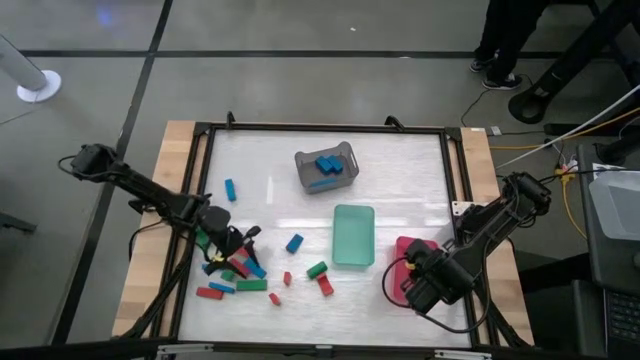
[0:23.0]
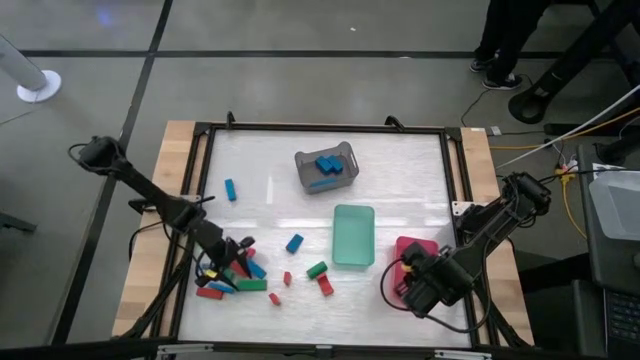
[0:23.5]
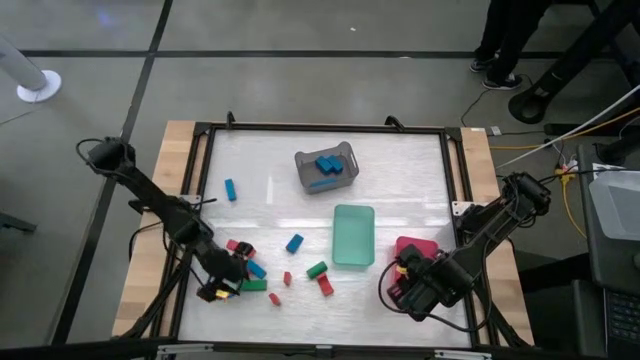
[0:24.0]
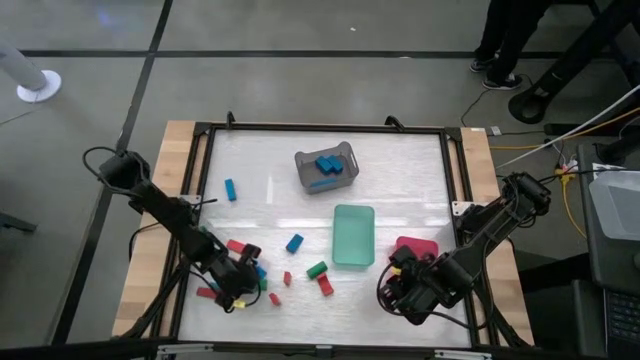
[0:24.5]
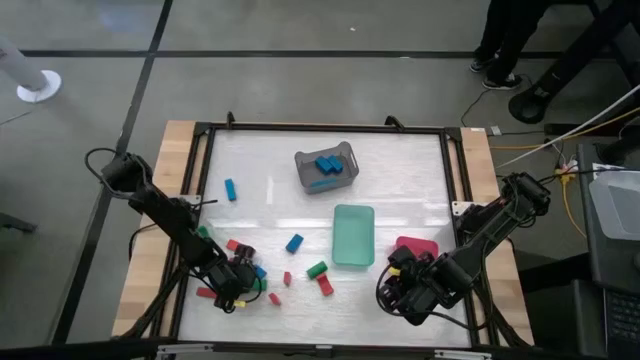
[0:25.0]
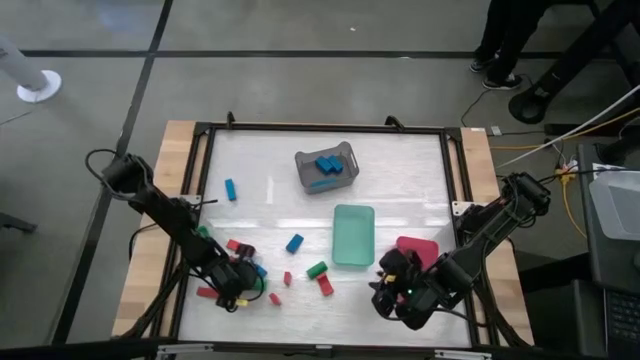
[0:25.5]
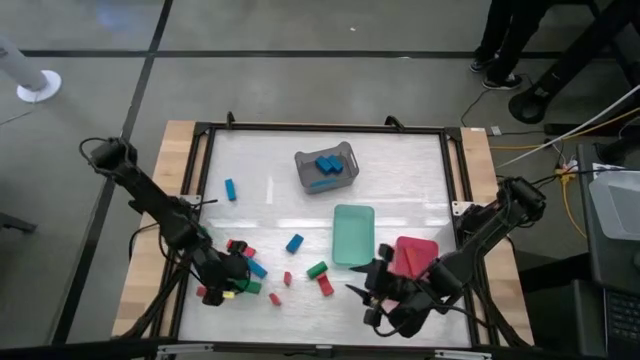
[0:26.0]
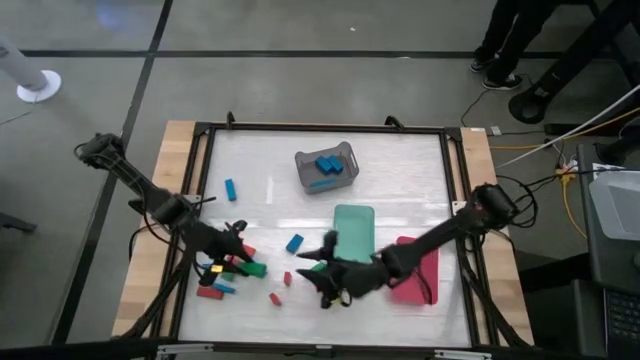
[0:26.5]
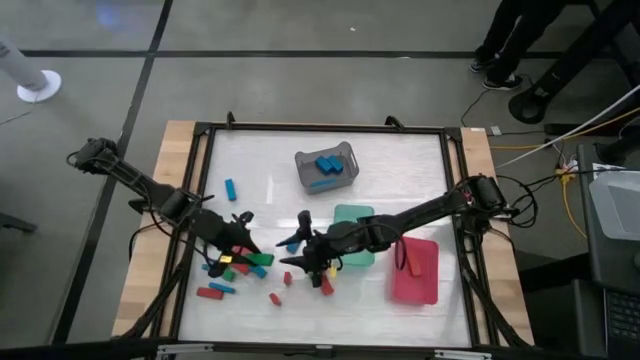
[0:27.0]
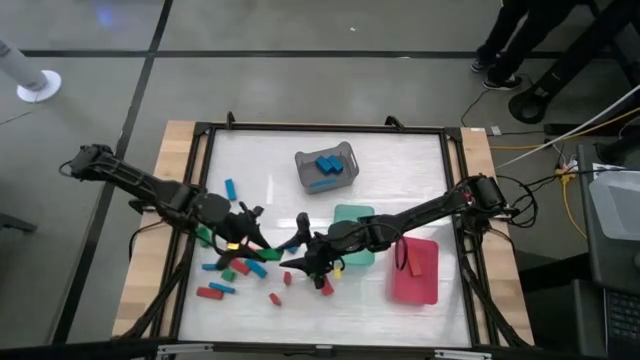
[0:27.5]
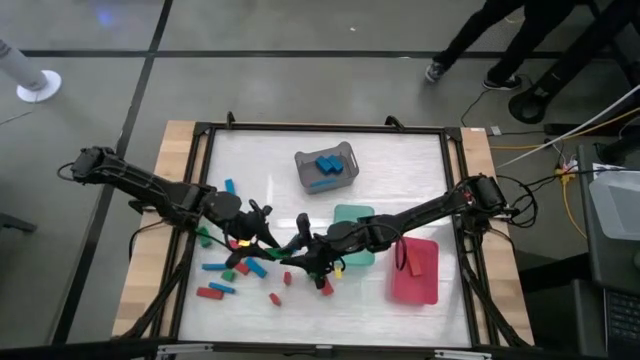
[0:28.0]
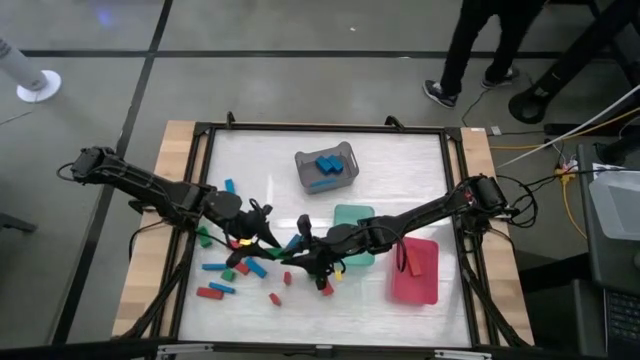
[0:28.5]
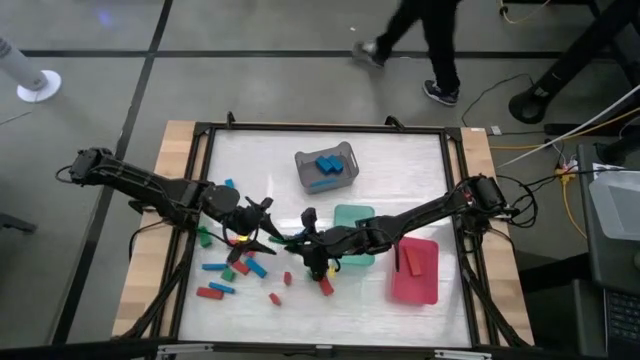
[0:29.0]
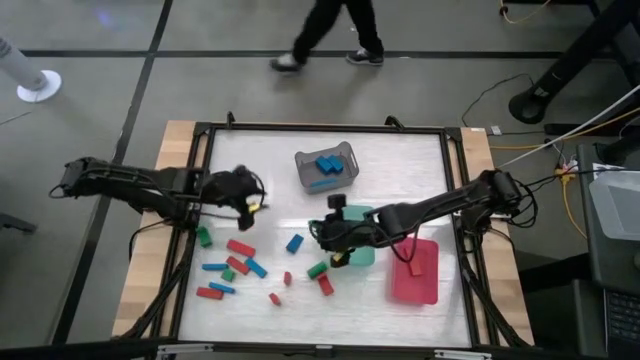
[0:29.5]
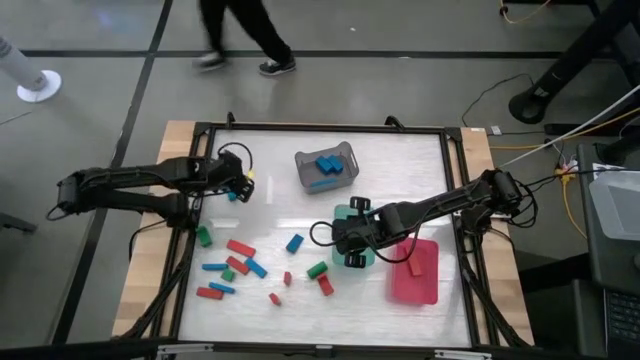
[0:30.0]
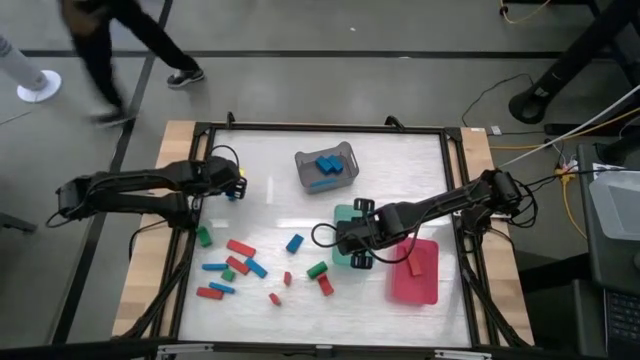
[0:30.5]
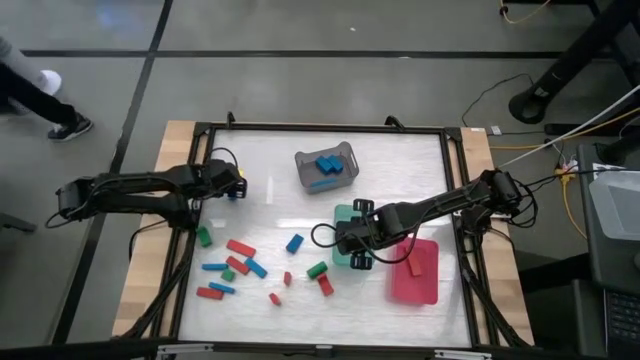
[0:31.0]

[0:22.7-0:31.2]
Task: Sort blocks
Put the green block into the green bin

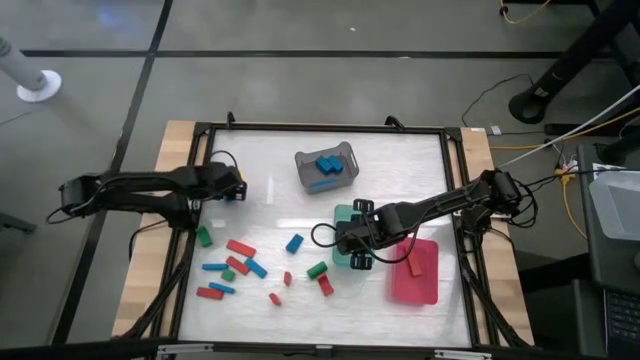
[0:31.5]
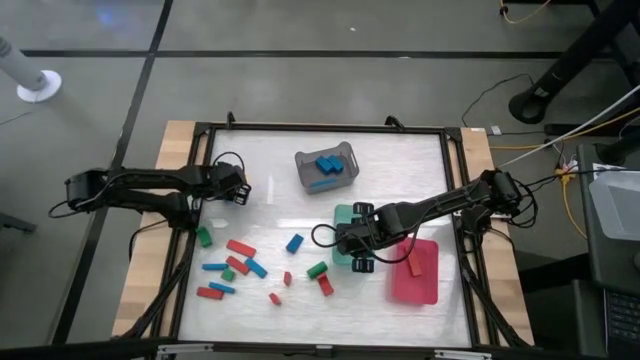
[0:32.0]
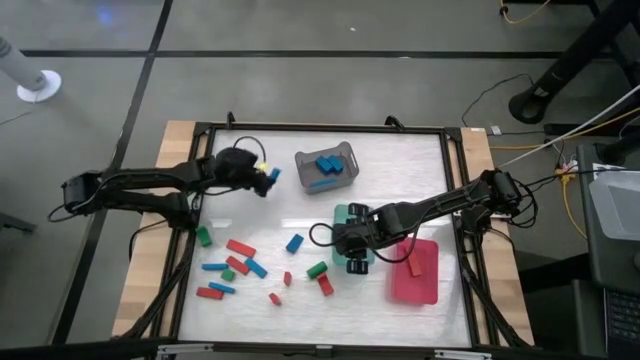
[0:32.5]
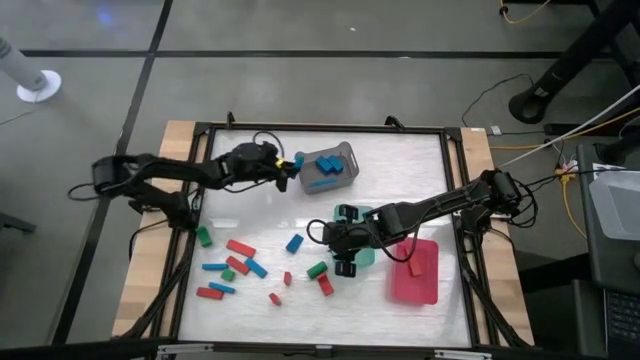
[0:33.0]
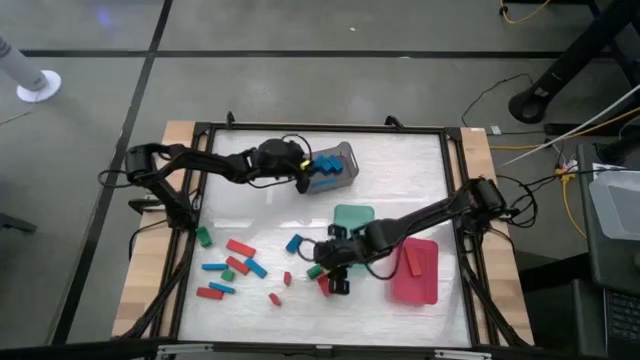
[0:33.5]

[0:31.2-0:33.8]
Put the blue block into the gray bin

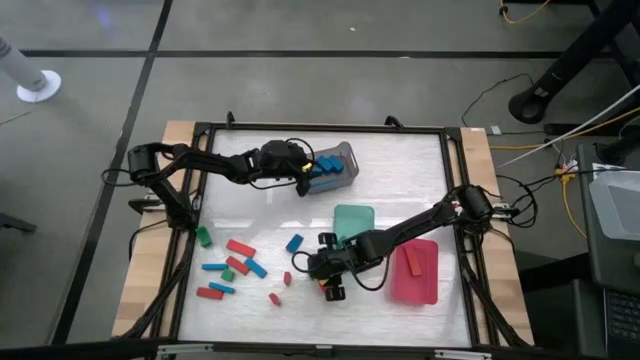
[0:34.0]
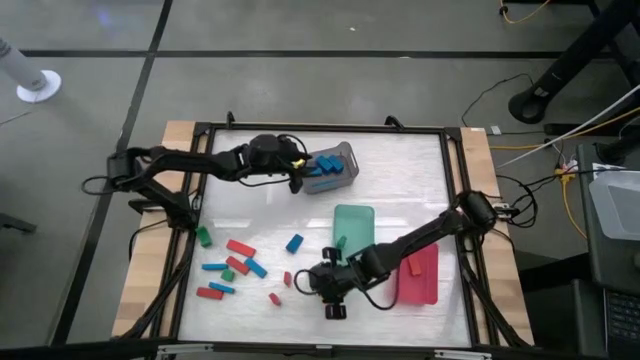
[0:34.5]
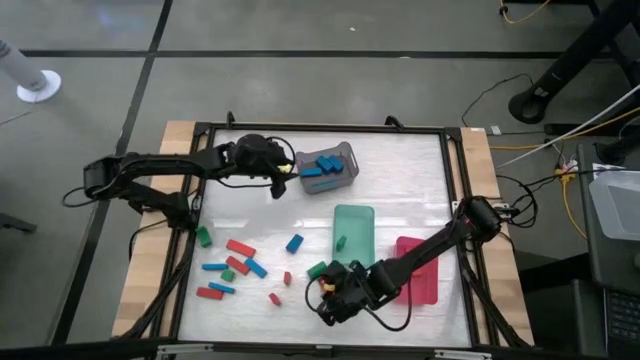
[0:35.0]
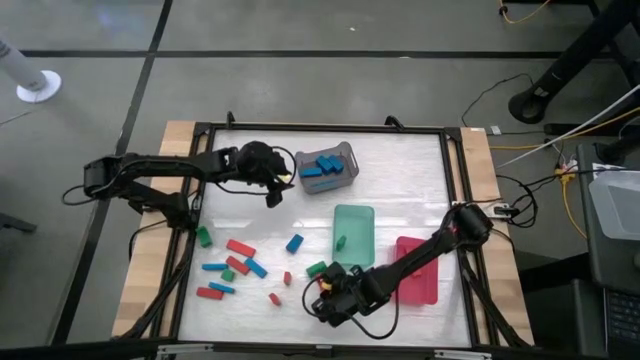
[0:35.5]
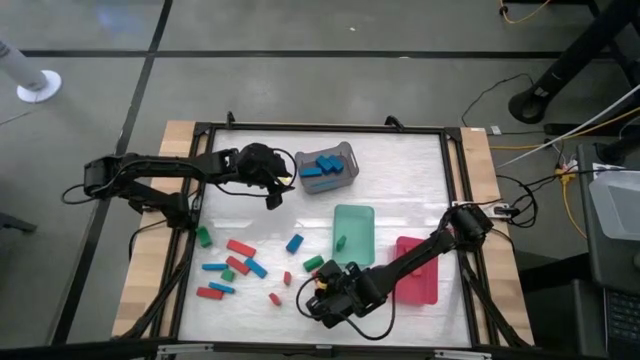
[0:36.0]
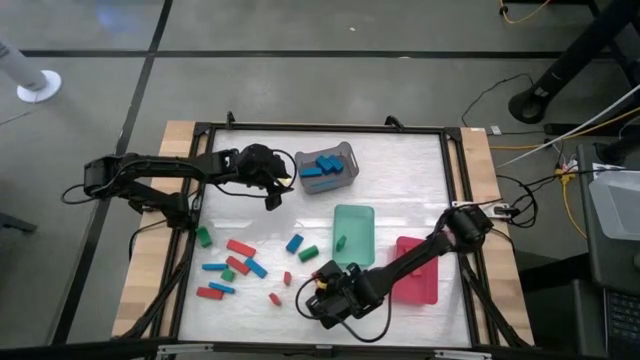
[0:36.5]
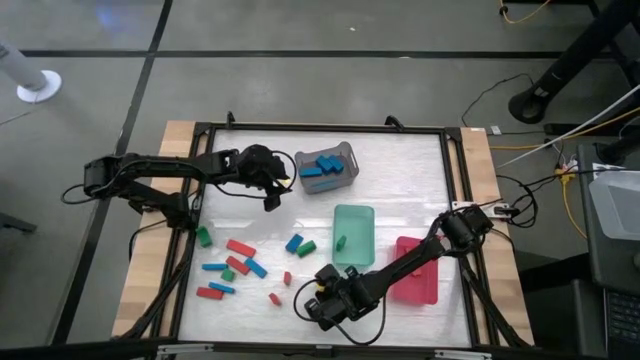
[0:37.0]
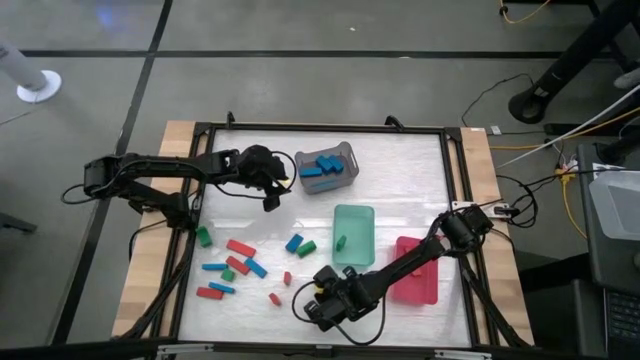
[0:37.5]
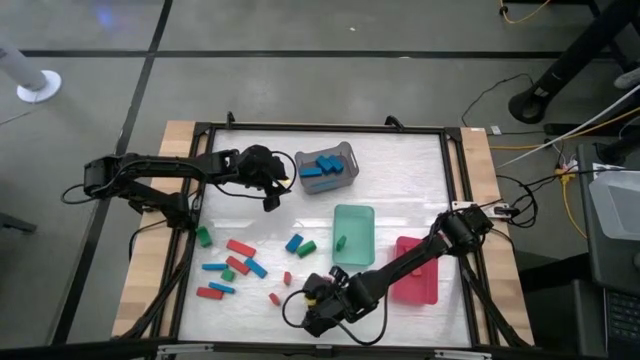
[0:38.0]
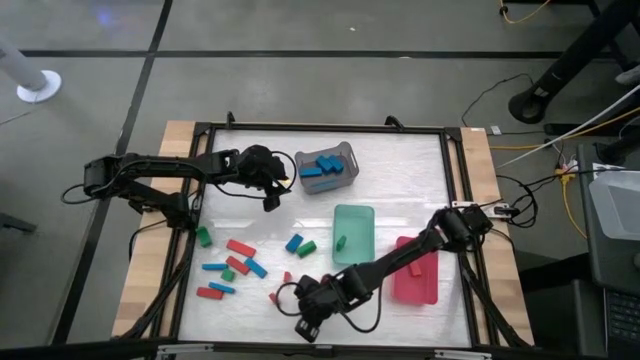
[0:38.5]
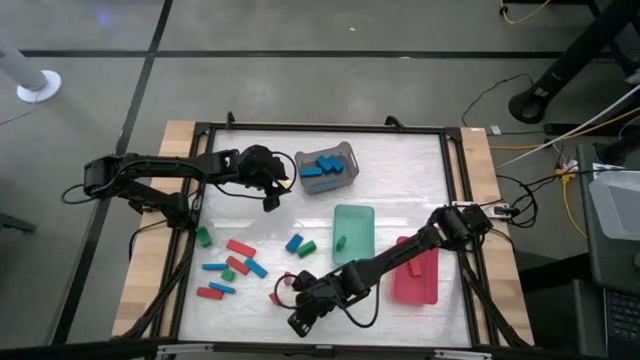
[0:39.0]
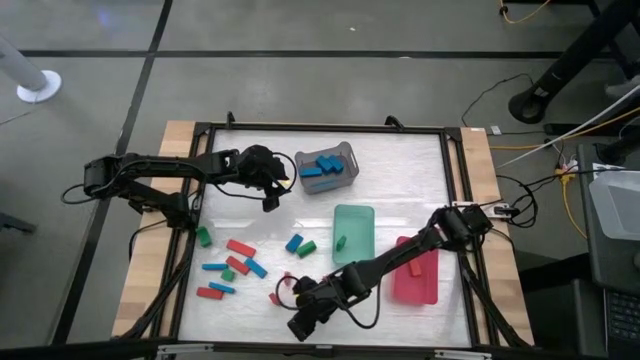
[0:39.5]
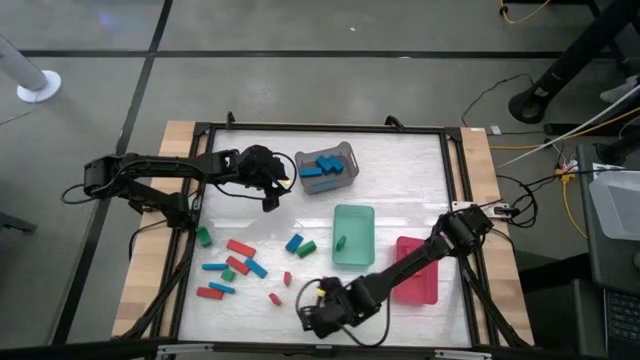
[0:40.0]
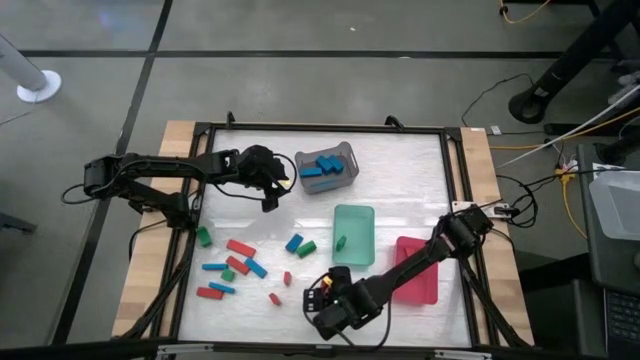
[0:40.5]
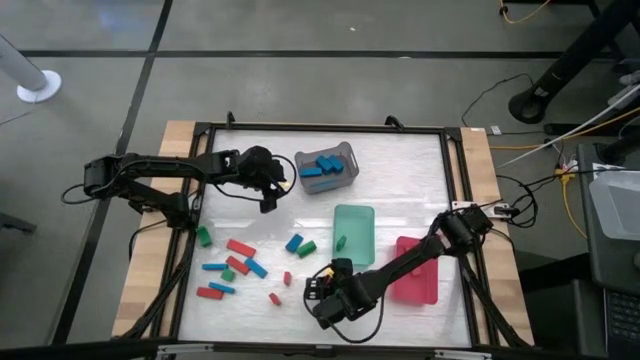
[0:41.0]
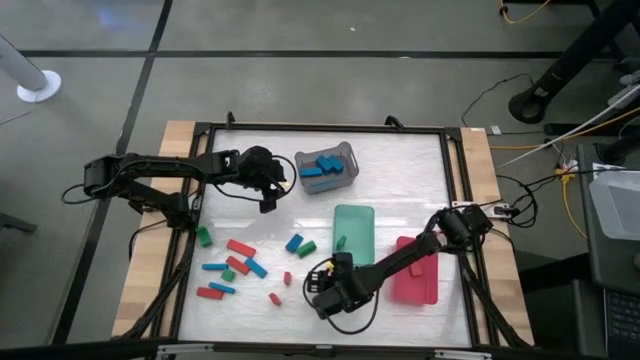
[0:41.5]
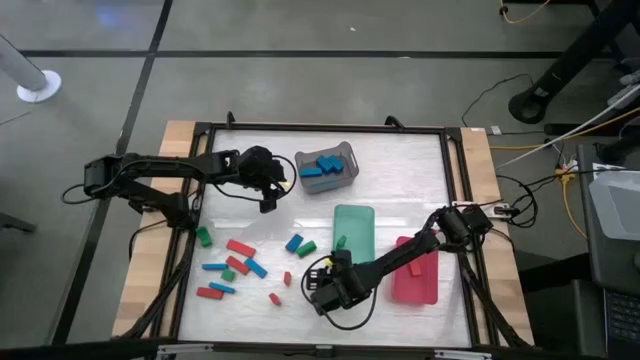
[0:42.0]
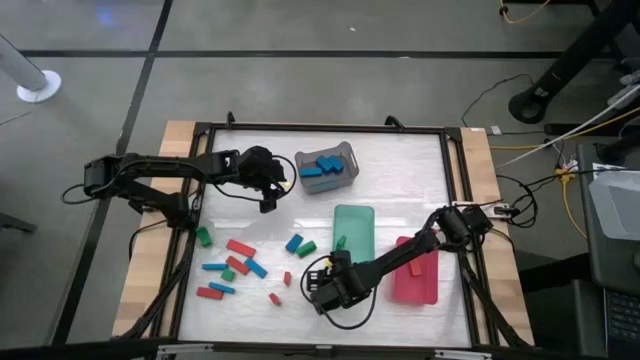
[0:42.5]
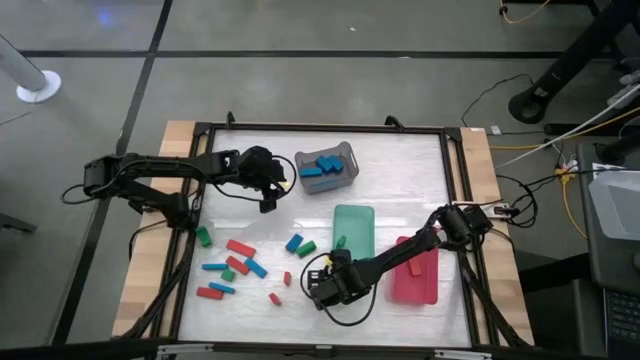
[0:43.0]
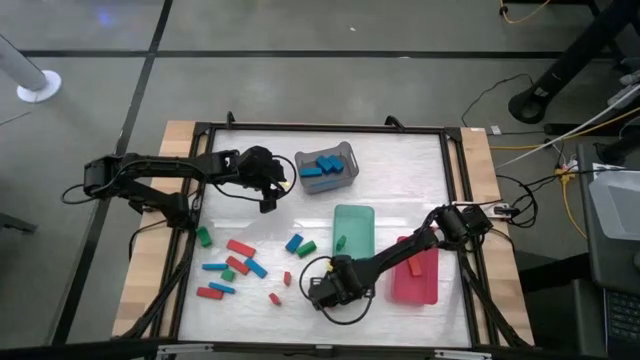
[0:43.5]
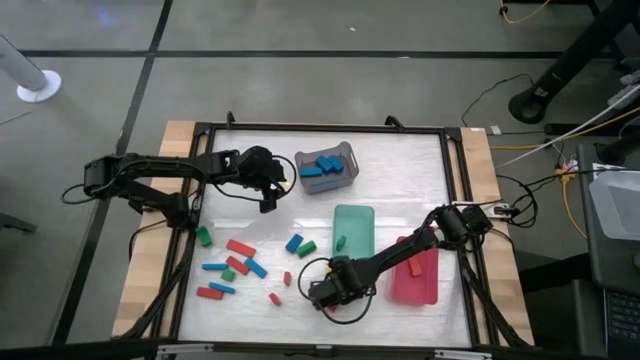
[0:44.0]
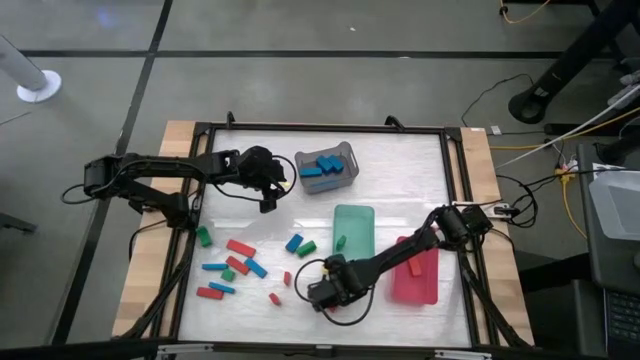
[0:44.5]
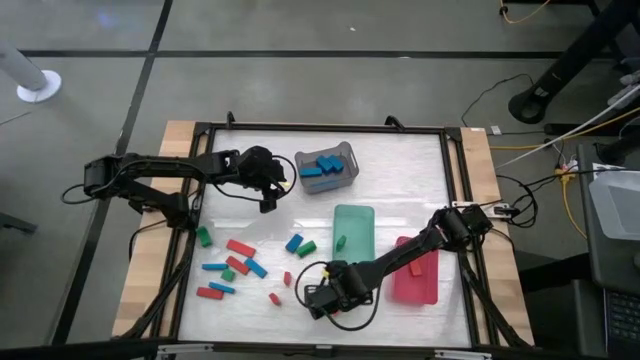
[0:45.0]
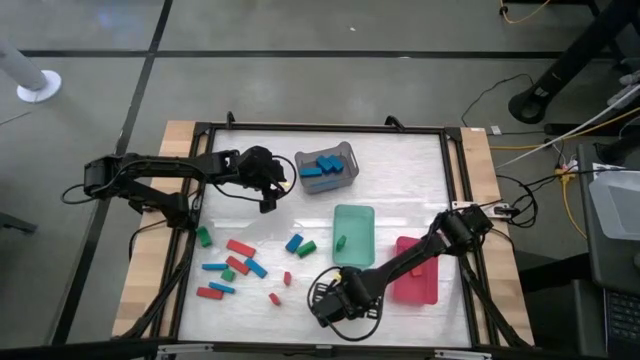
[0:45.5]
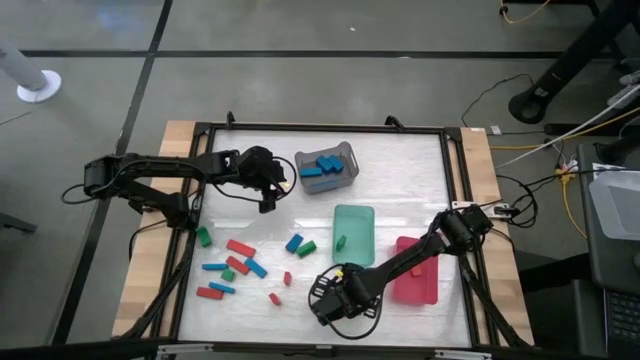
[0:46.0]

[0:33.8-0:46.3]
Put the red arch block into the pink bin
